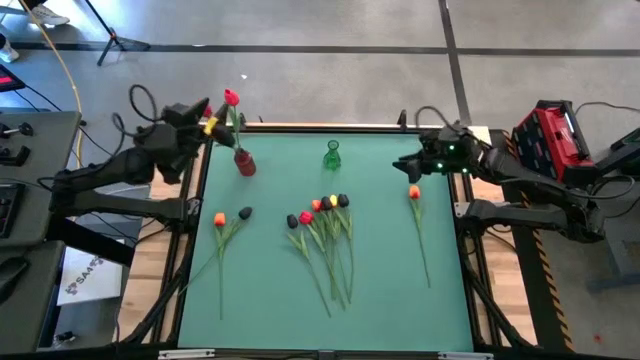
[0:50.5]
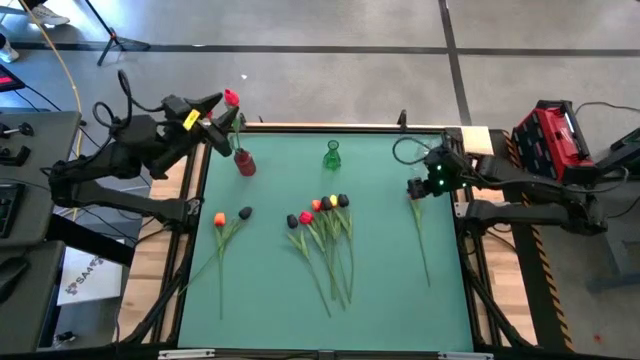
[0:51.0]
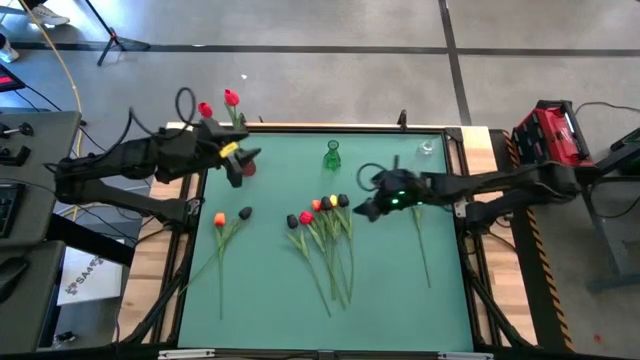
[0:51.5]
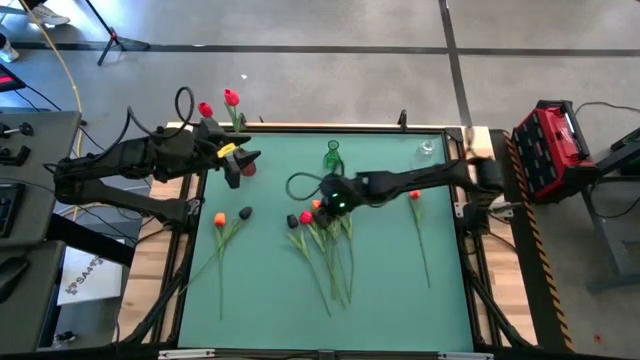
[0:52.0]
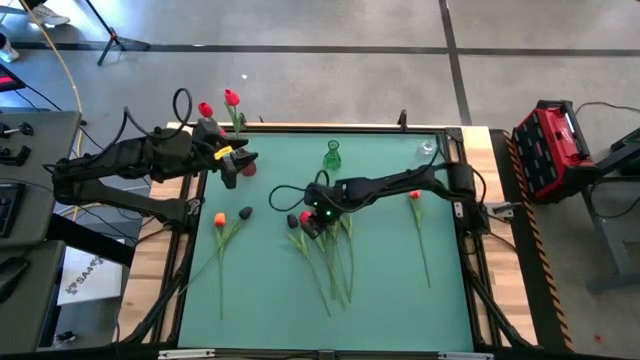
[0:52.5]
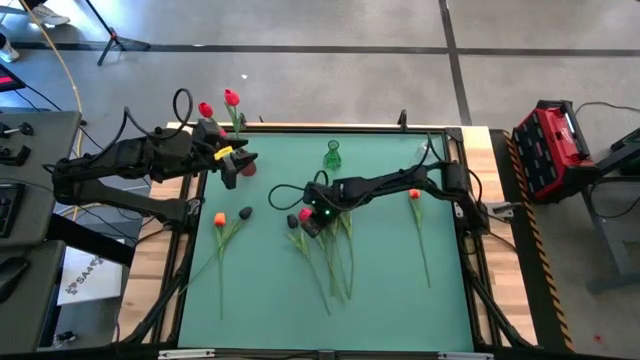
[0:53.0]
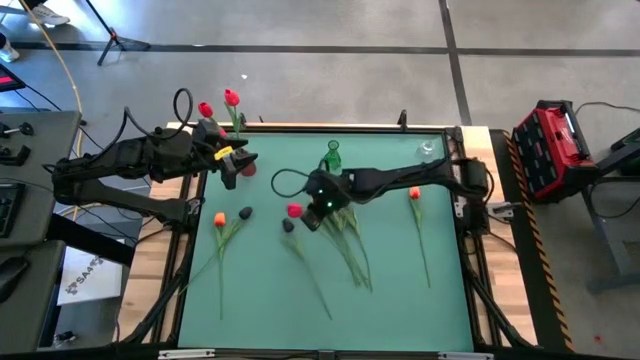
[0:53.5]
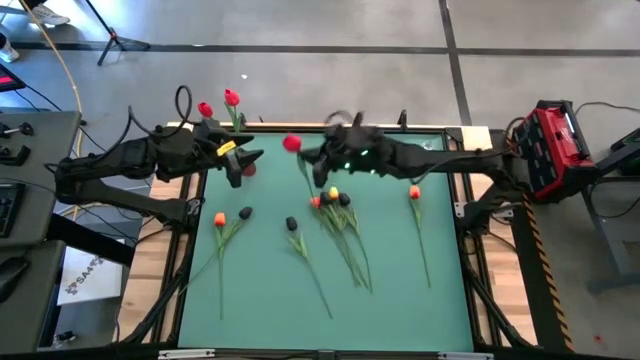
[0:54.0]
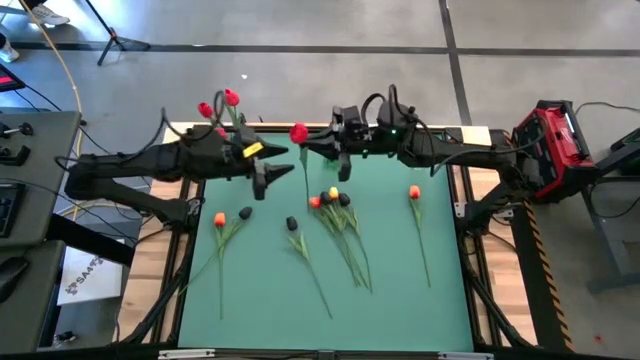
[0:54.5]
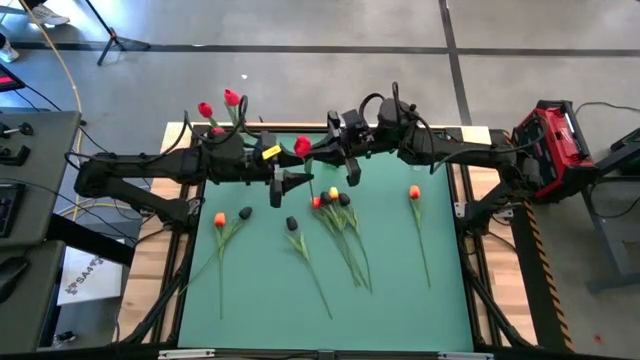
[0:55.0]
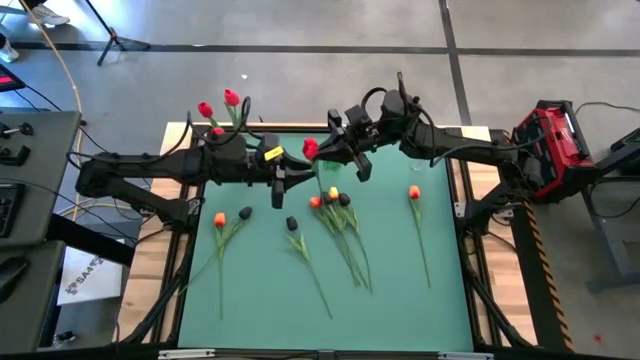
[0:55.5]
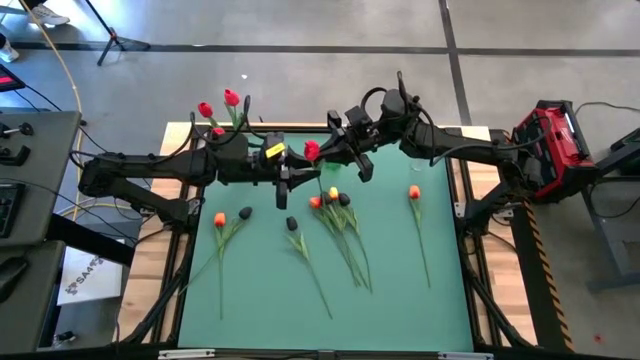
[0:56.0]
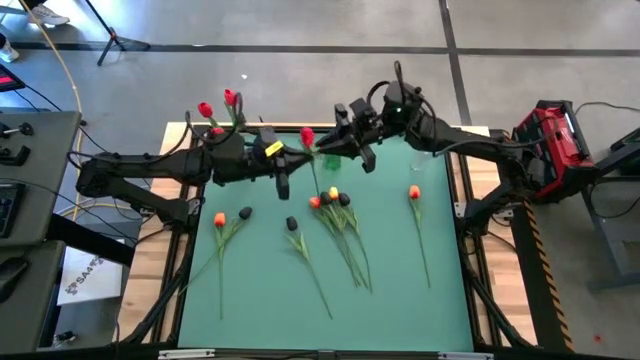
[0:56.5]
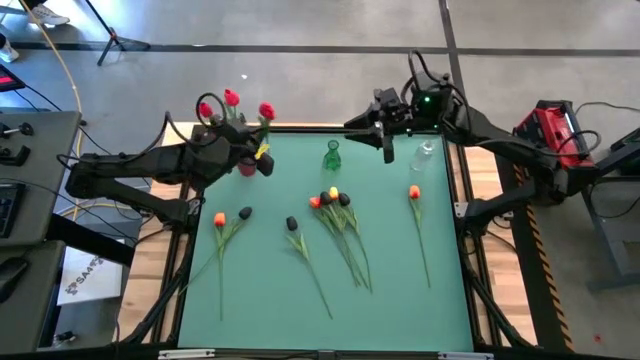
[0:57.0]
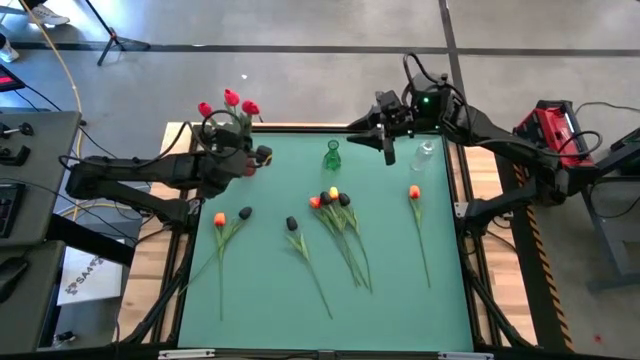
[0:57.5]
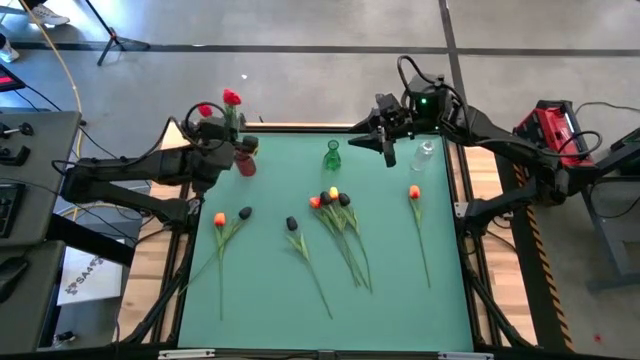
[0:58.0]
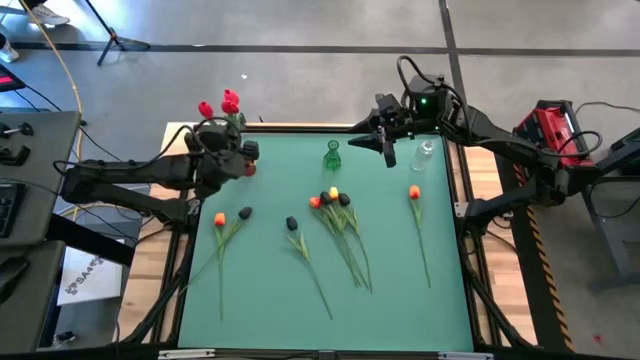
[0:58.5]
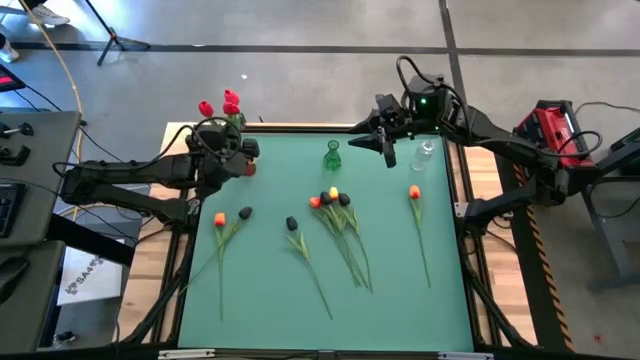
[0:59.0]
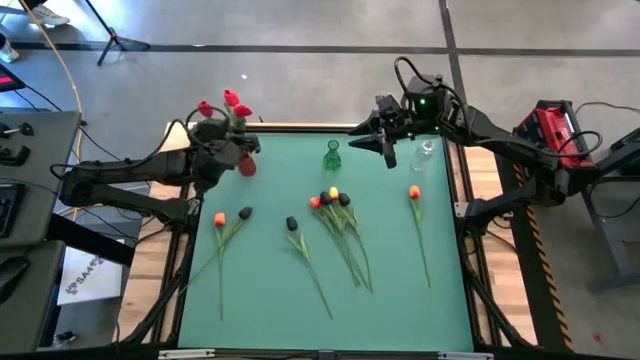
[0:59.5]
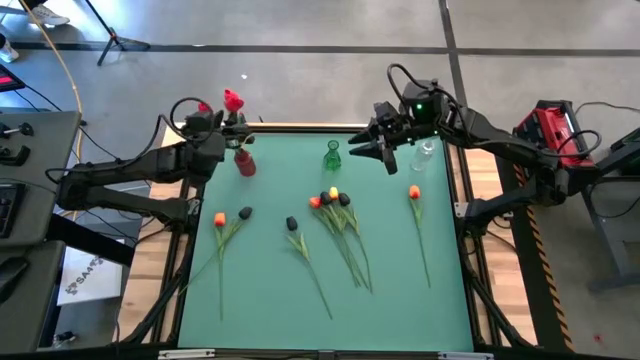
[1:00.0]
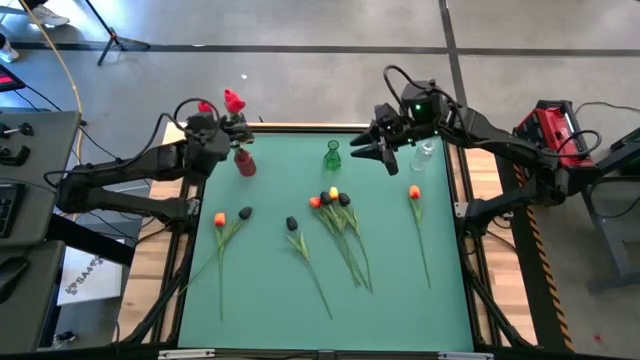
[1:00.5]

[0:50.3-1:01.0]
Task: Sort flowers into vase by color
Put the red tulip into the red vase

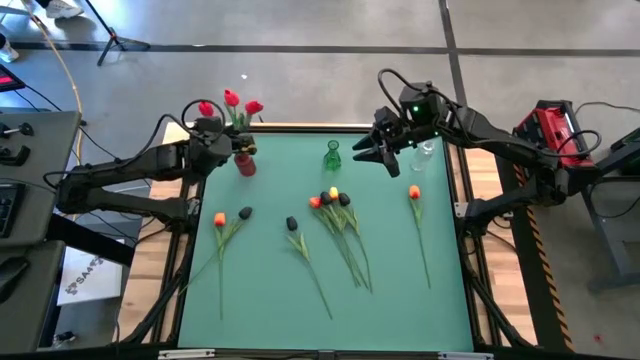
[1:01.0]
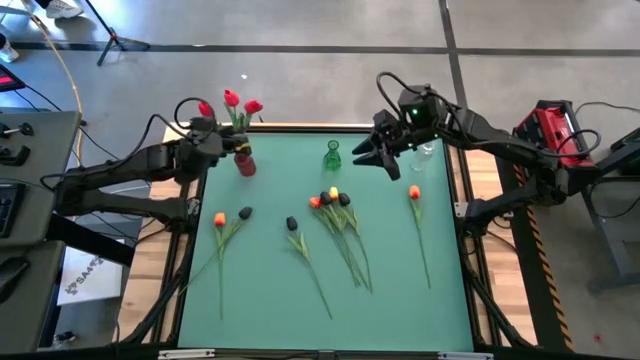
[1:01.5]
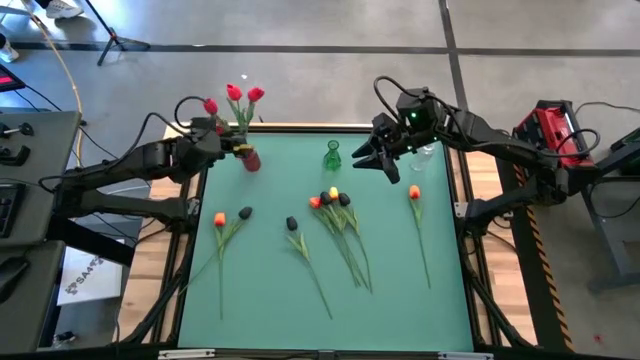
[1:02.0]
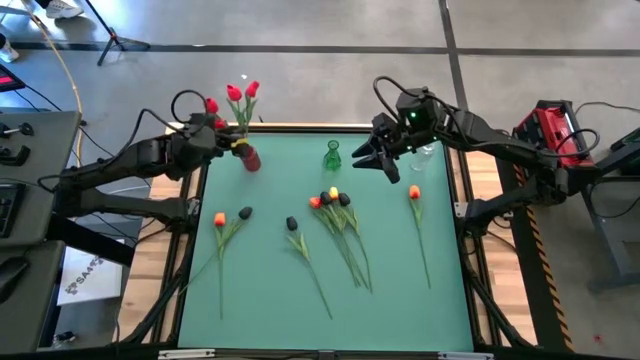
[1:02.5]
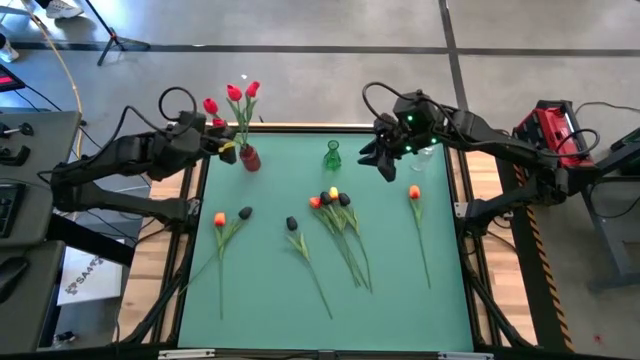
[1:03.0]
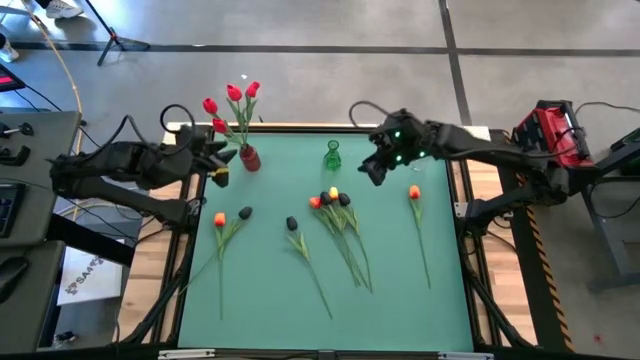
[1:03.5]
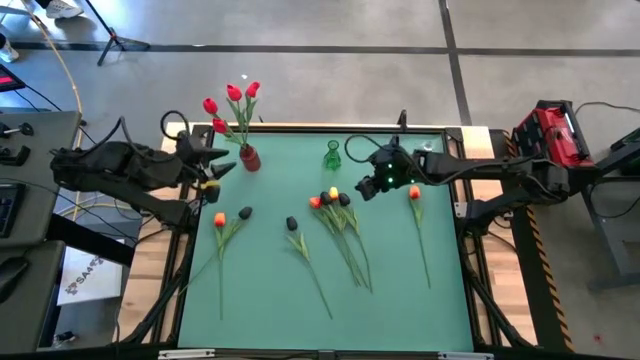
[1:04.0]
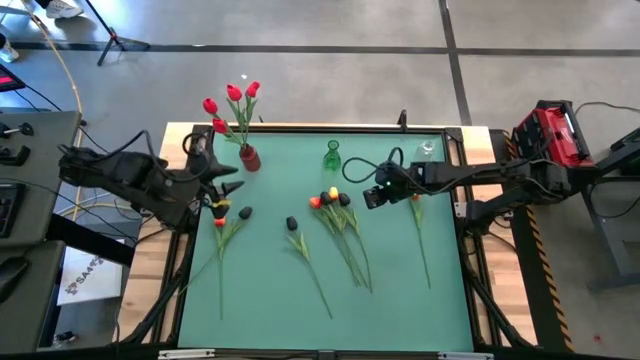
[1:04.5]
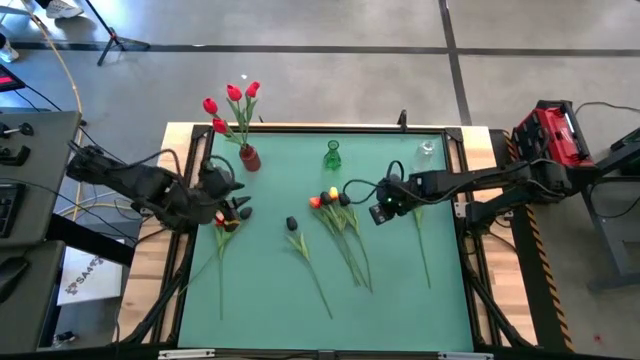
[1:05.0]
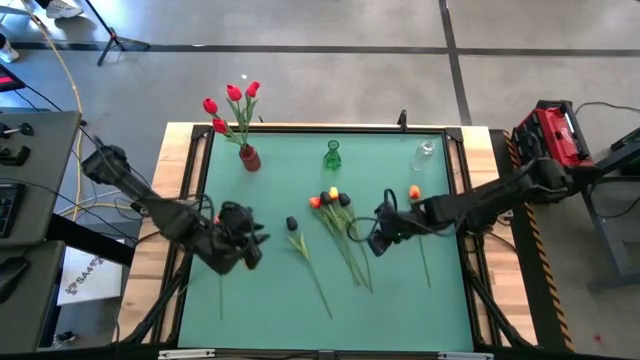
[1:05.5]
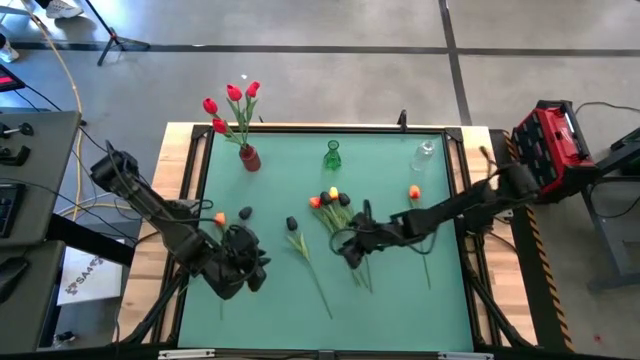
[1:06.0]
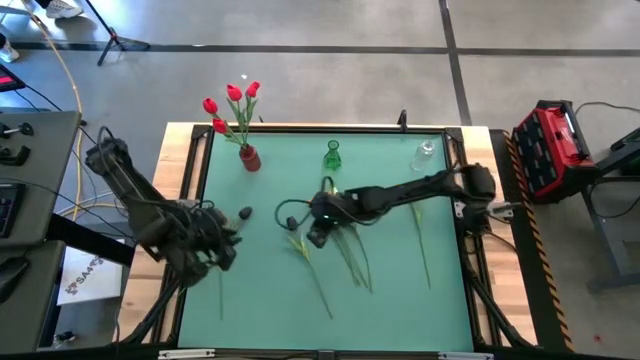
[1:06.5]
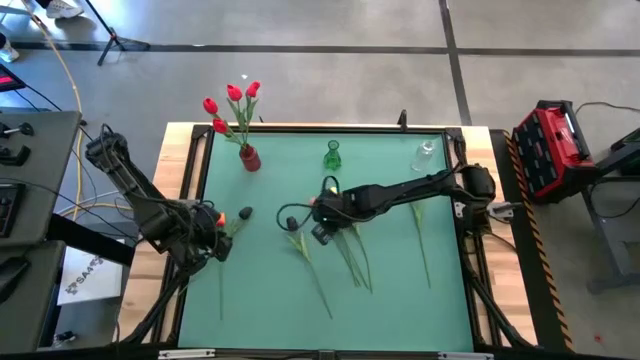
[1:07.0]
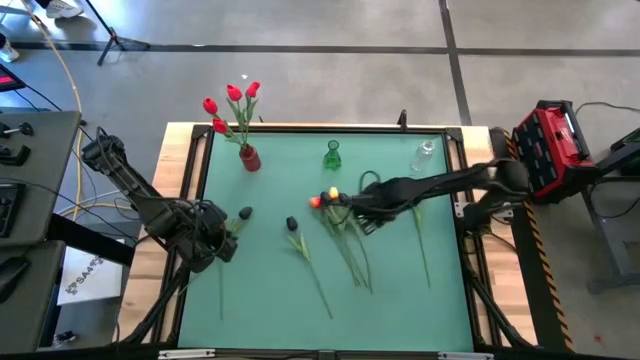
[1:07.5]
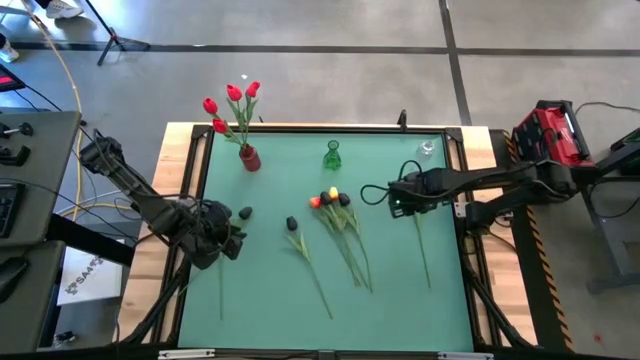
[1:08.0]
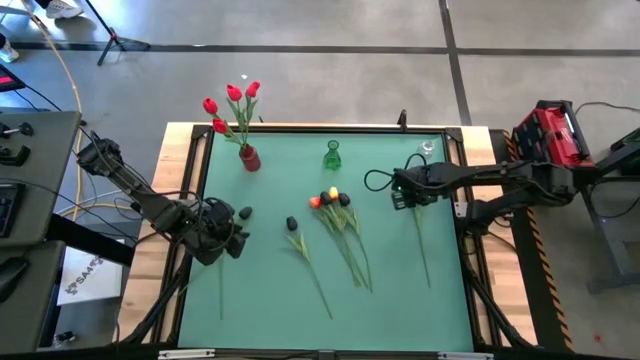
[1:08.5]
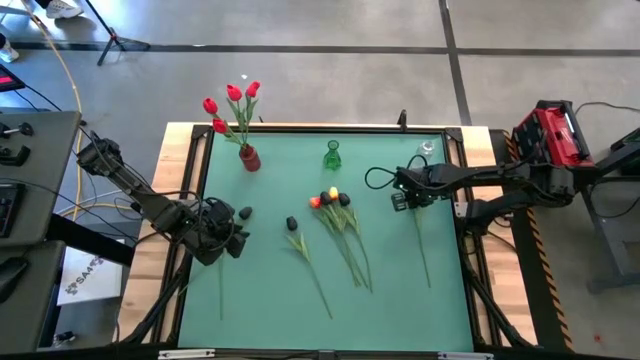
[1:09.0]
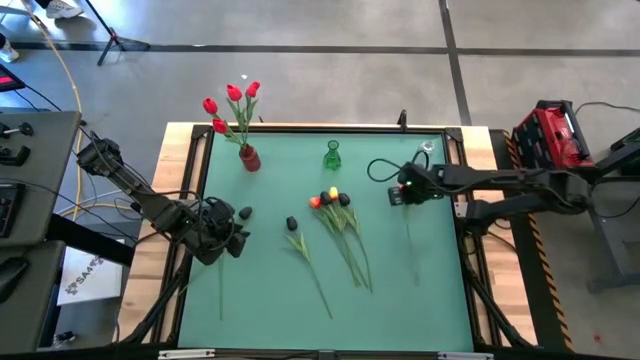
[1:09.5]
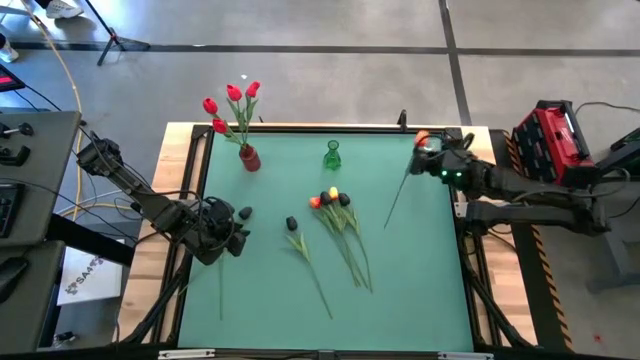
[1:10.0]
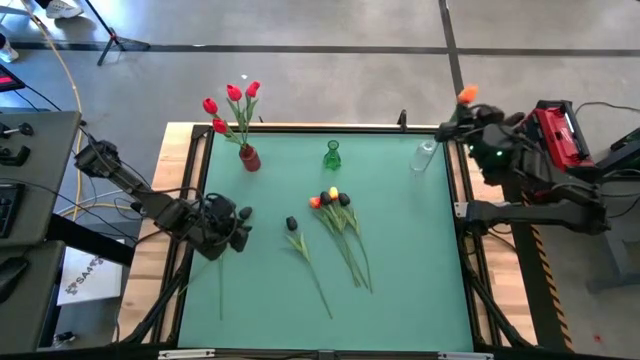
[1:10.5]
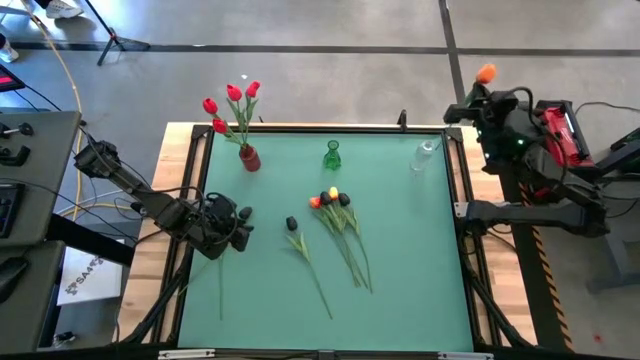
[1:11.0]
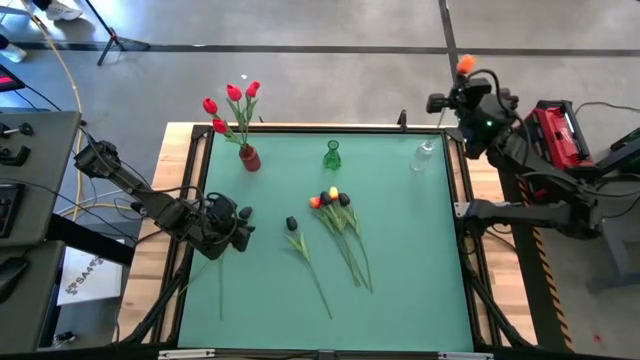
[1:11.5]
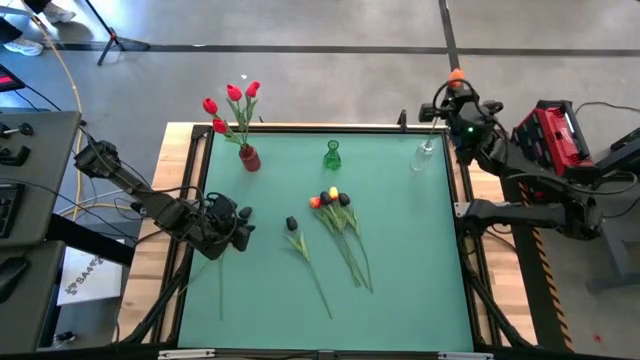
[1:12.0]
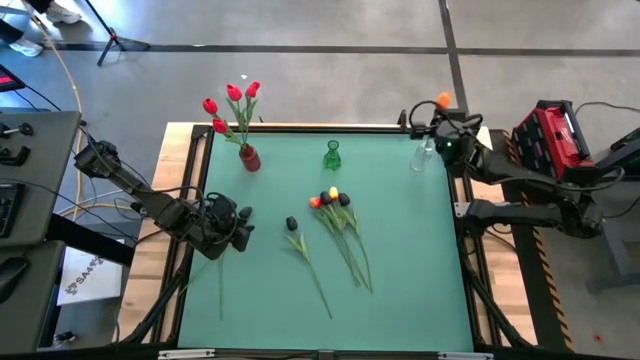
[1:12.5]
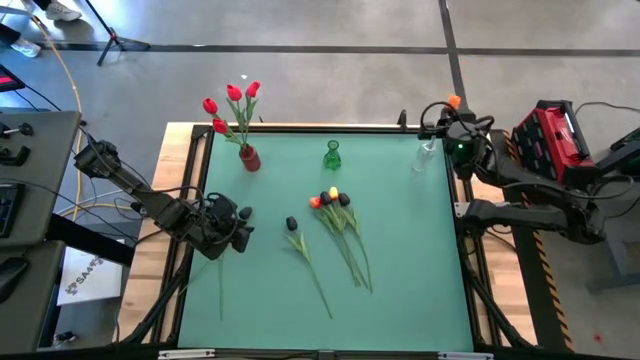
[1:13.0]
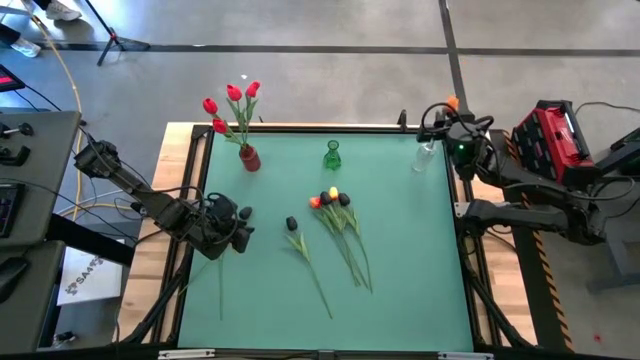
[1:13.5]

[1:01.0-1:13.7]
Put the orange tulip into the transparent vase
